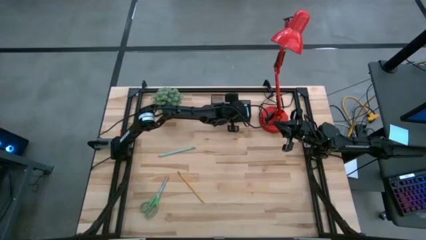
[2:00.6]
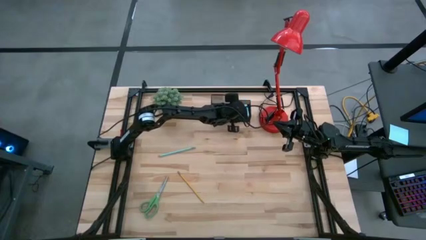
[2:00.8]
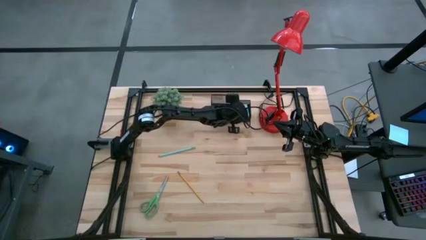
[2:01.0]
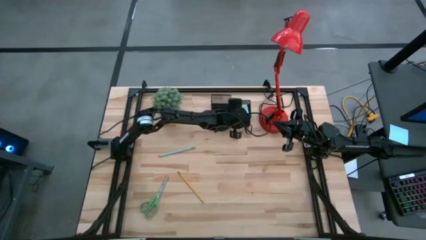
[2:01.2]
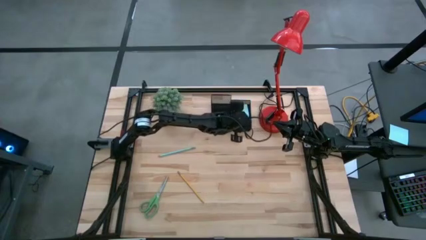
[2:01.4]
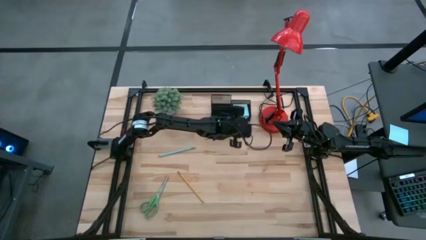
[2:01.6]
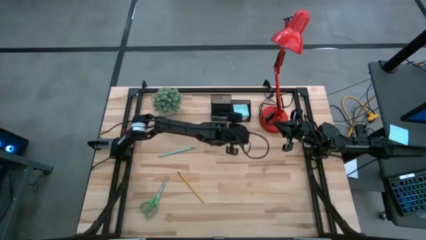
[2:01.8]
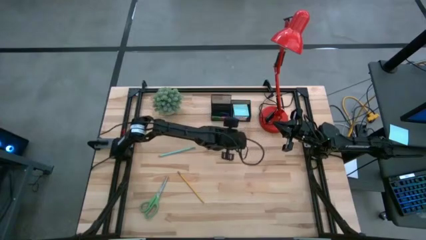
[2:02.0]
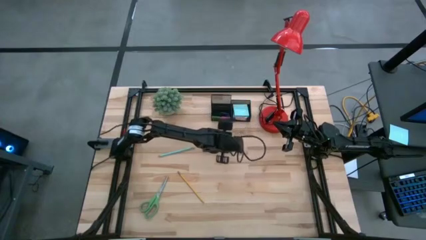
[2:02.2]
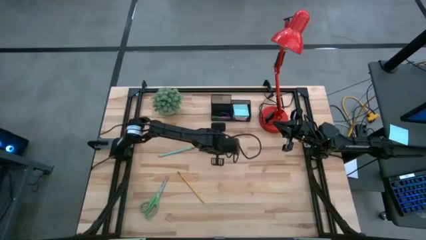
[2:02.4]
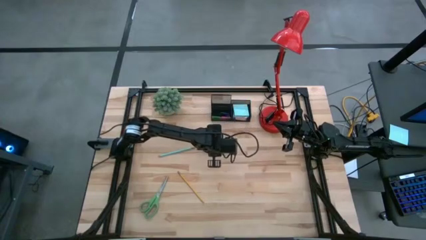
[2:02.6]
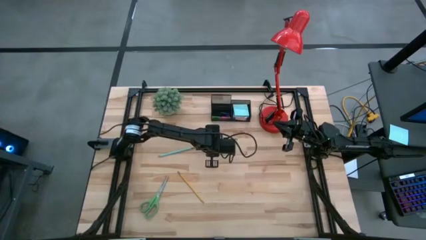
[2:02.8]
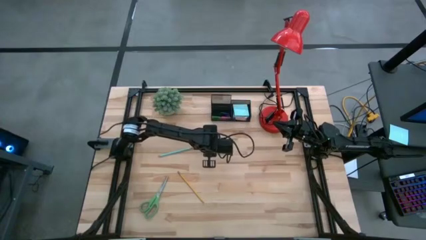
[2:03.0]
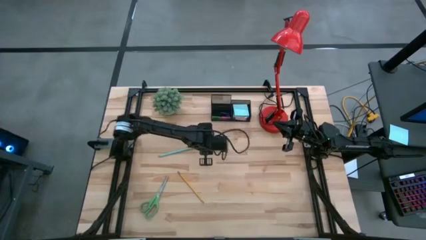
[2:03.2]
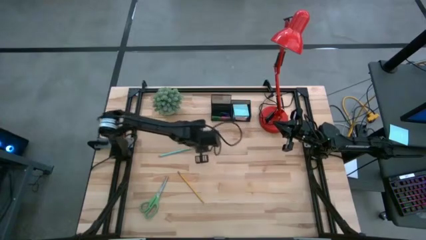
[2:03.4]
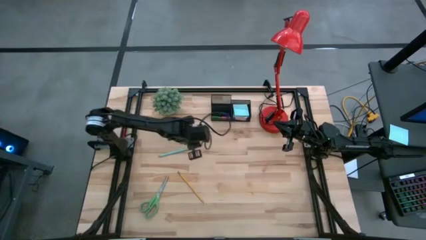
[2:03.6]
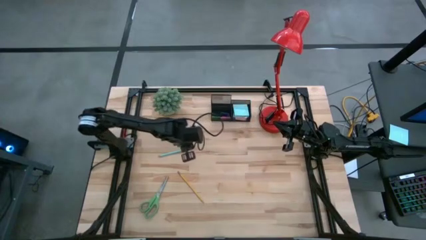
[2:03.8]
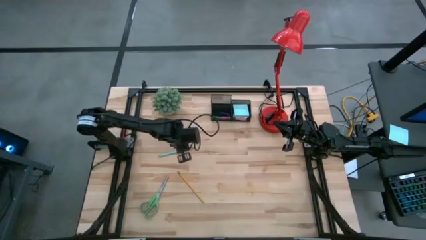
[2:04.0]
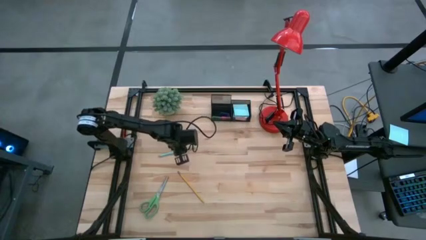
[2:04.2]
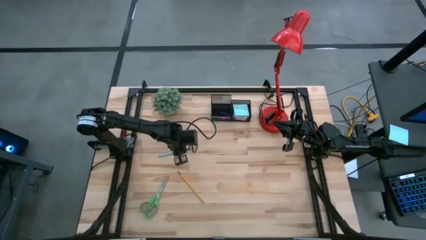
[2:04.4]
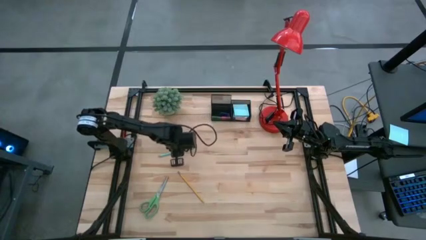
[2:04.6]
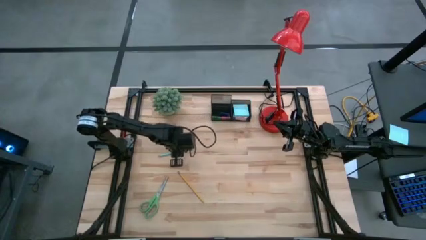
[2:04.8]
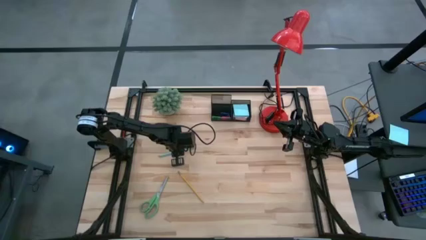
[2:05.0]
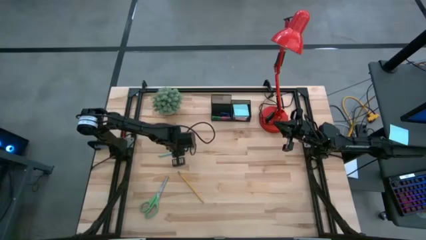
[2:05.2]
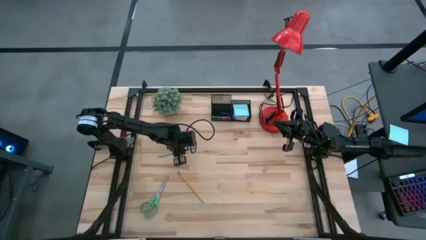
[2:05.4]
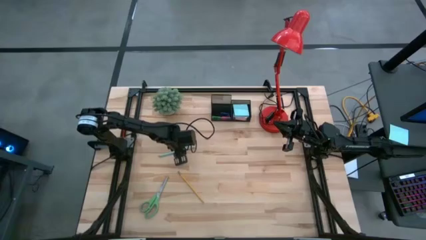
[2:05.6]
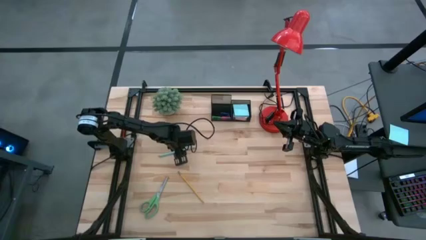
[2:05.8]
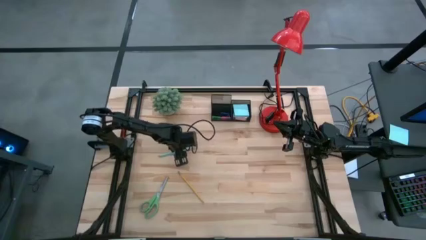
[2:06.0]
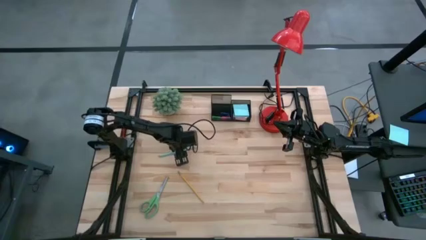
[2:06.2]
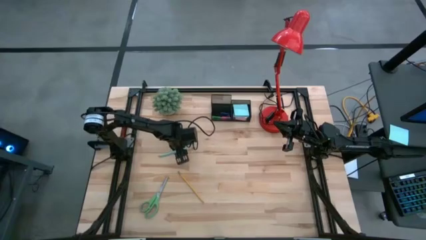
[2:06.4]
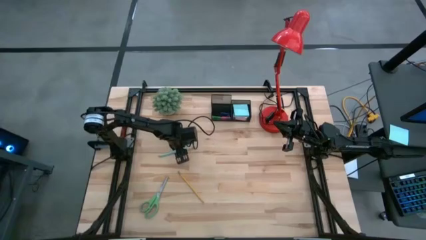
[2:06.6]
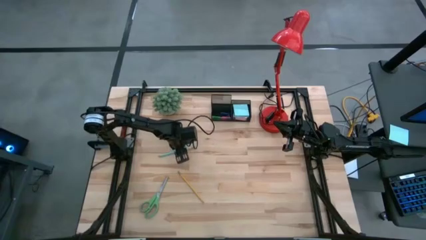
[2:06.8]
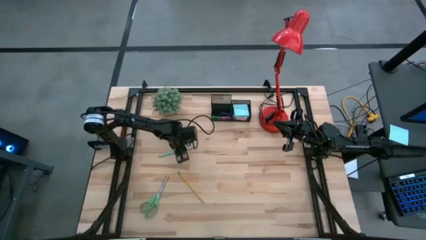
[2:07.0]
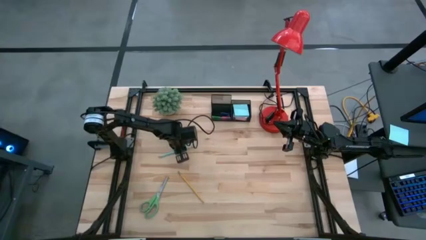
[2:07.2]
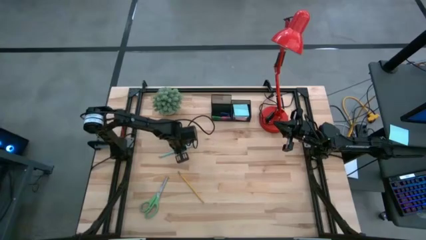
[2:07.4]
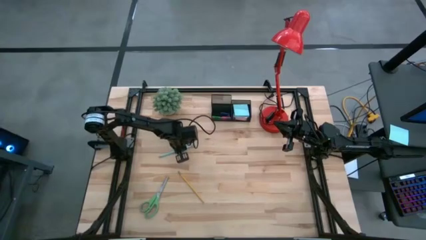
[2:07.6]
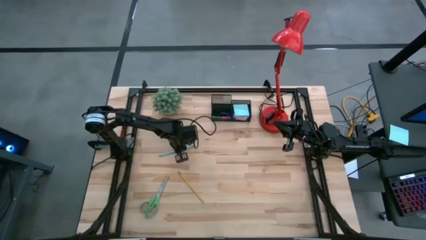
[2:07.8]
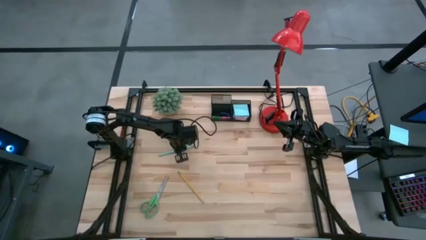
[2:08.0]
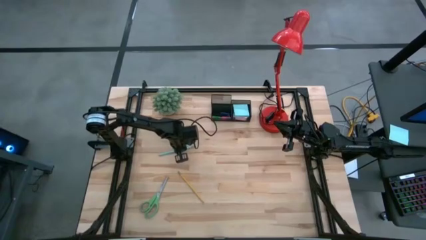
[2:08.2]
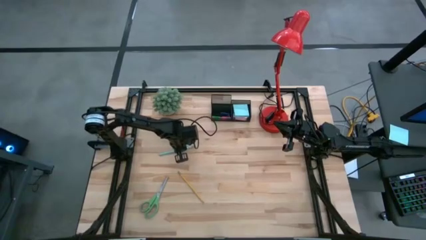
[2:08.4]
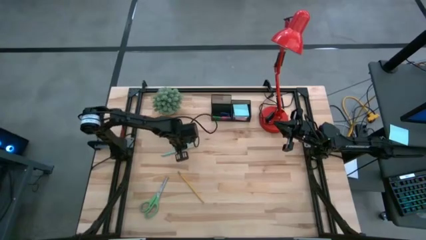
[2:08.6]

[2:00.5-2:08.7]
Task: Pick and place office supplies into organizer
Put the sky blue pencil into the desk organizer

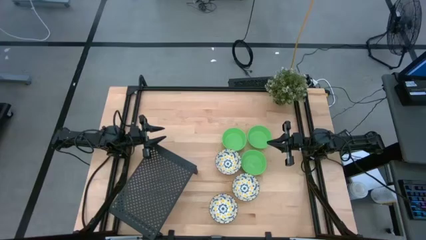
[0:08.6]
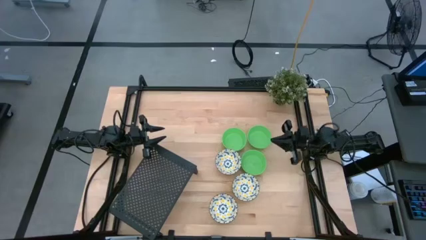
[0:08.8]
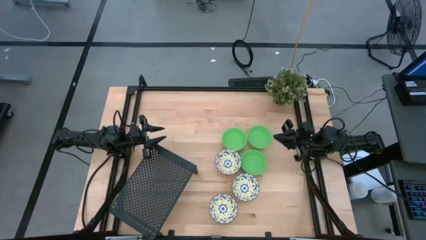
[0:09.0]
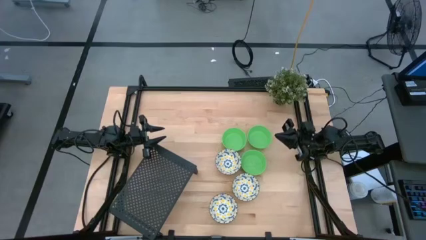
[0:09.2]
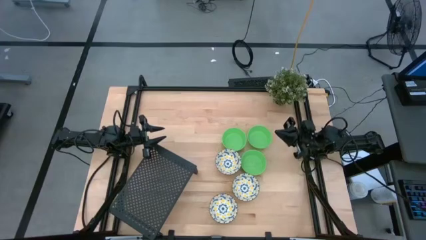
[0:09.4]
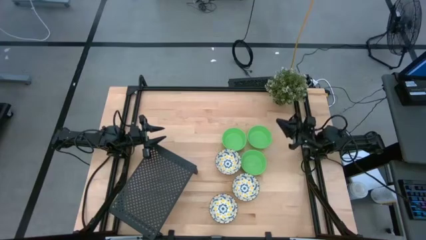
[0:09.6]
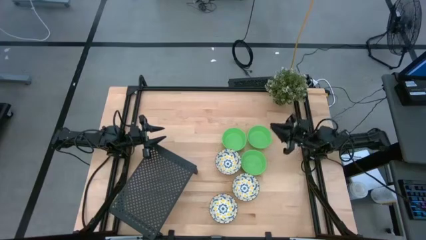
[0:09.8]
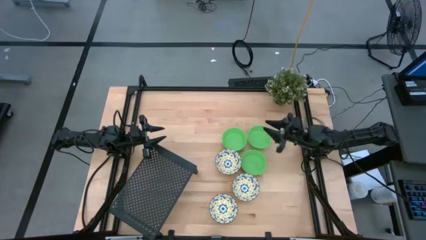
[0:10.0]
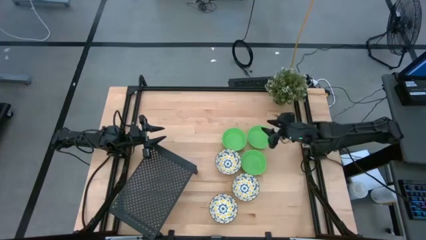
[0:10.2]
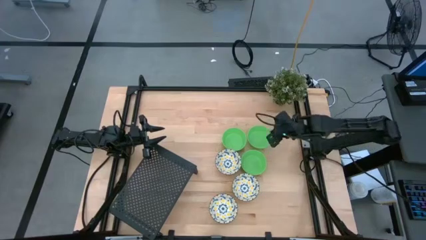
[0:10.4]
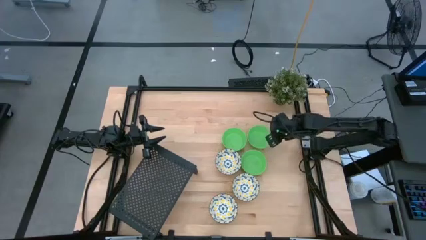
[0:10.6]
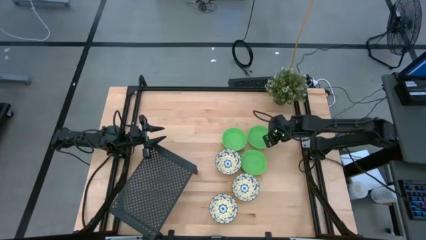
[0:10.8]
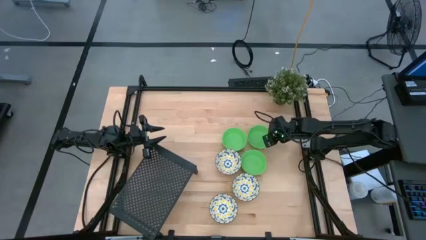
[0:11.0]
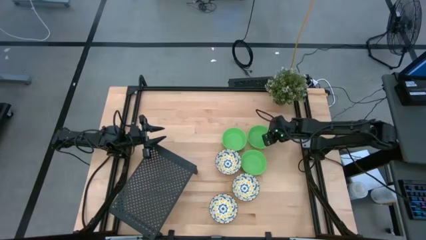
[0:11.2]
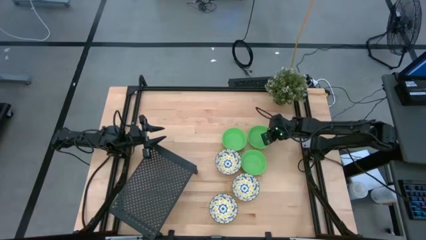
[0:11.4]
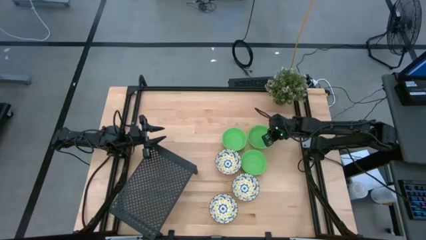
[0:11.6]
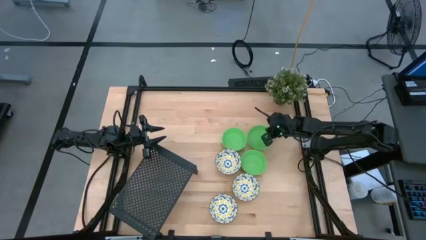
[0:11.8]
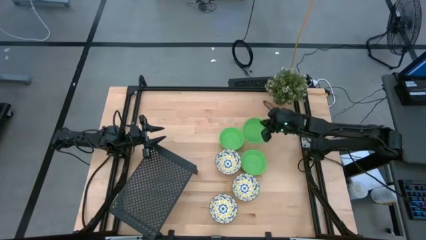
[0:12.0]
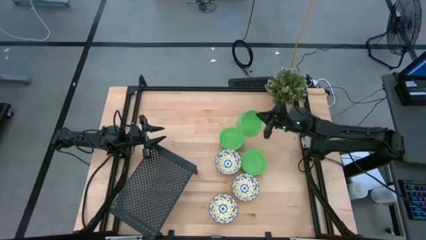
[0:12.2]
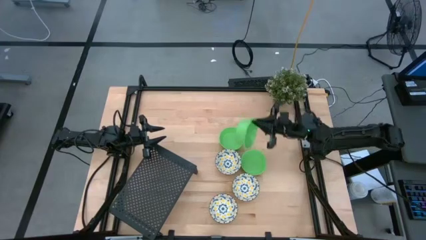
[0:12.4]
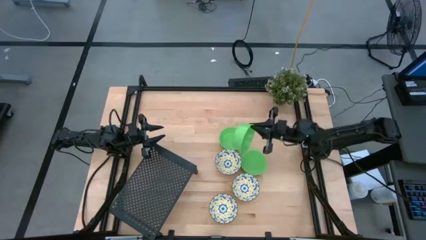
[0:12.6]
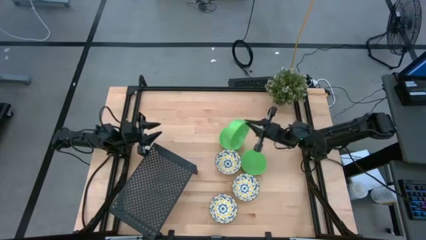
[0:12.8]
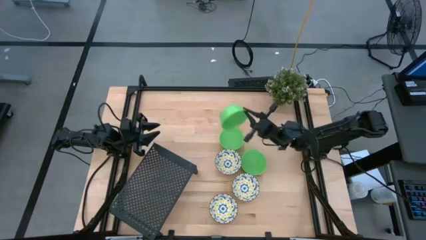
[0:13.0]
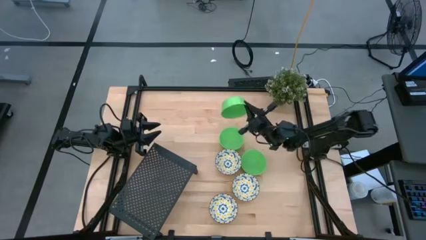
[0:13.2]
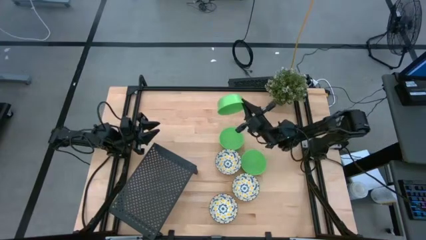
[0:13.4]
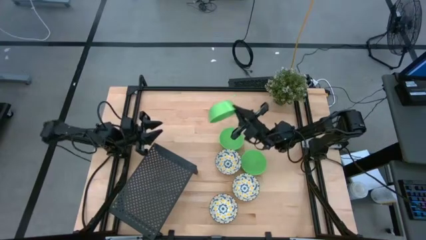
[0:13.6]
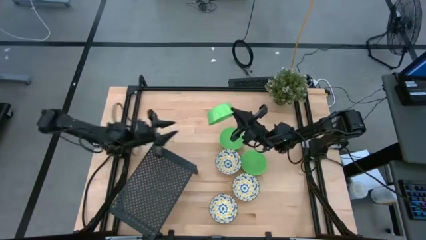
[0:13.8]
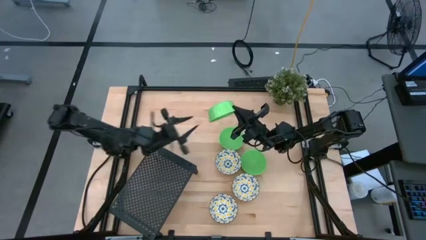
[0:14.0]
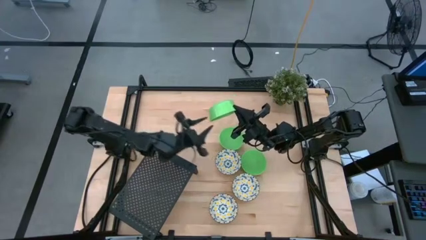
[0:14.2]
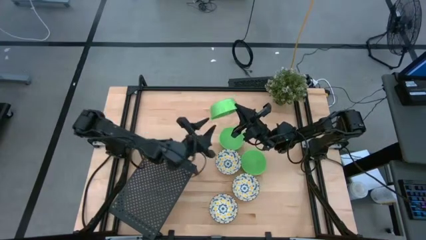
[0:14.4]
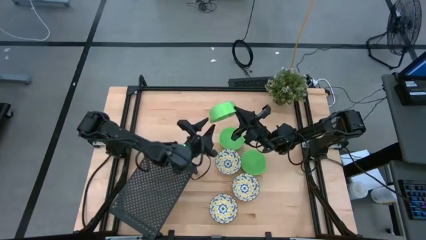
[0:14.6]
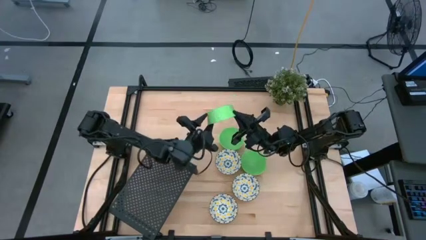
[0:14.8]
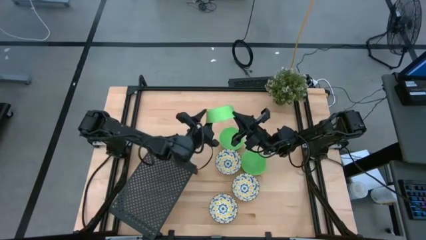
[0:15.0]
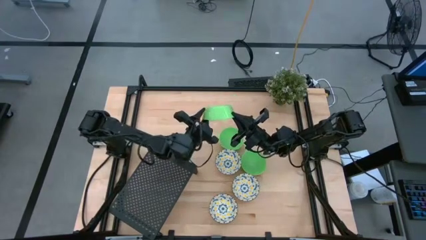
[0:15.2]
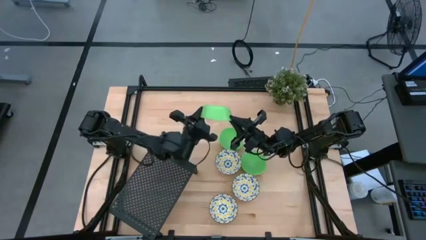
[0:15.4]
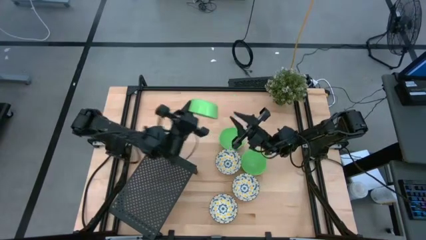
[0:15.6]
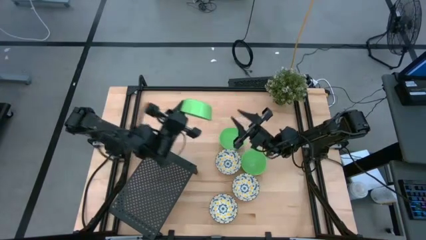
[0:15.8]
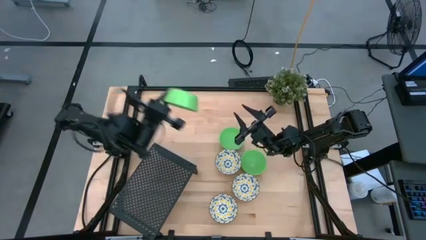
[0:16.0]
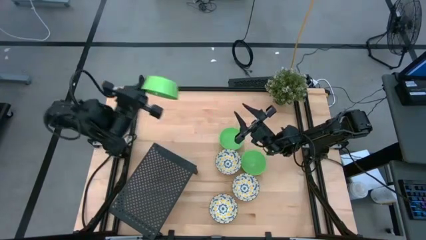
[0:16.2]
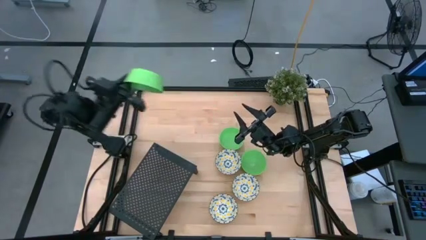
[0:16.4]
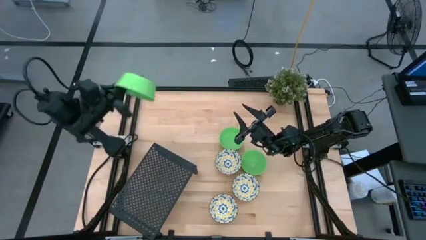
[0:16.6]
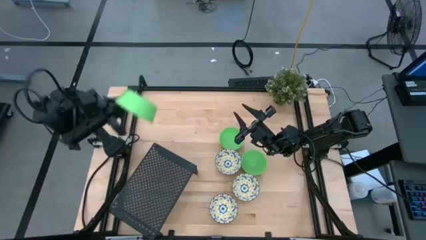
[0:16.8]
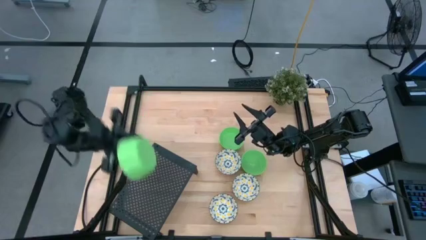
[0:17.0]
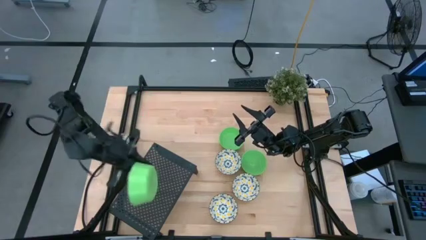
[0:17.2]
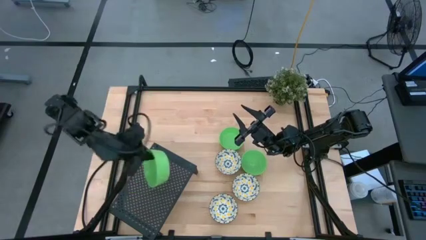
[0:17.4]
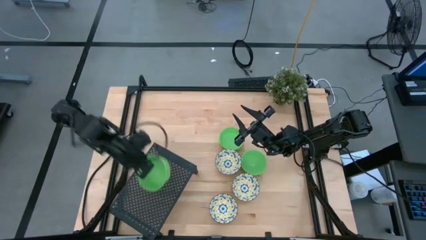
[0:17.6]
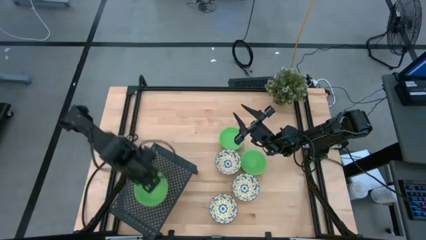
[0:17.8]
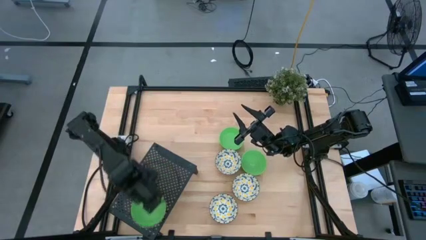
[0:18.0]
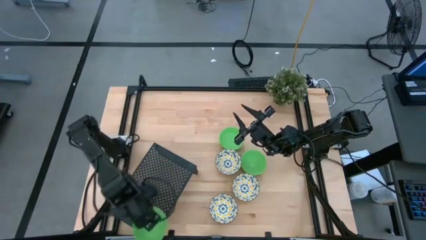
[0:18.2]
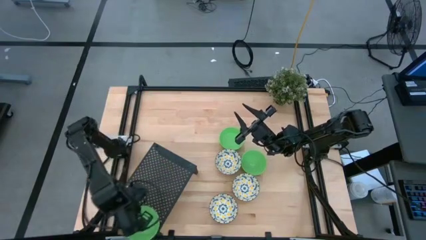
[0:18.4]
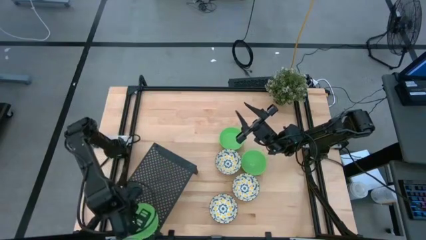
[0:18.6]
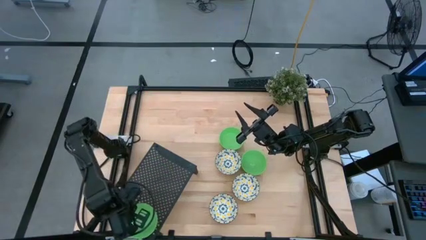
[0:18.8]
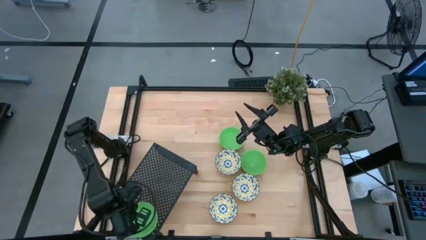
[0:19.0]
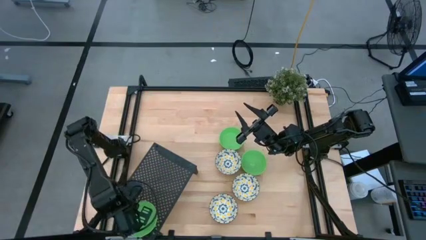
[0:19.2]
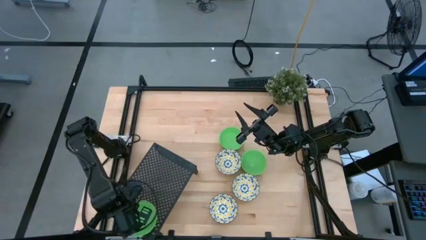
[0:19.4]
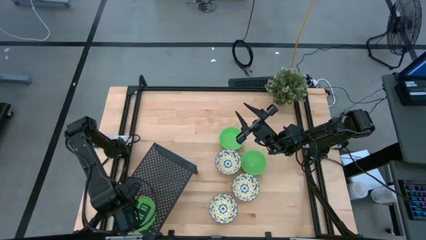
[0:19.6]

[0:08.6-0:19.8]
Task: Pick & Place Mini bowls
Put the top right green bowl on the shelf
